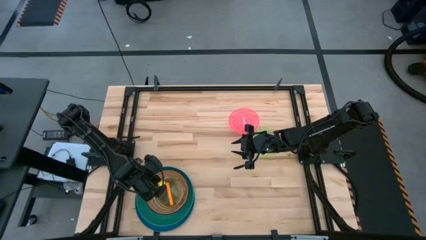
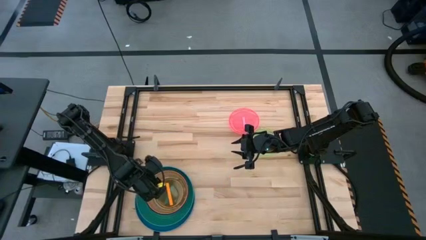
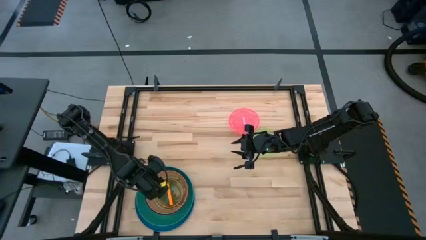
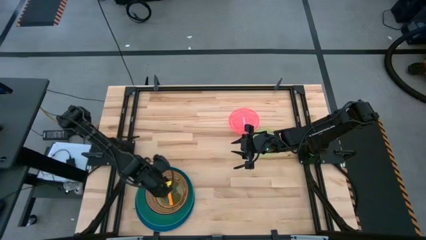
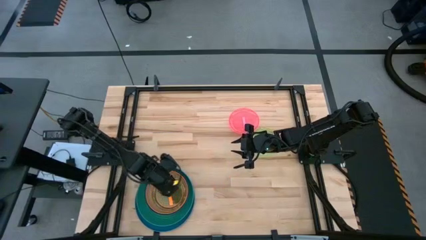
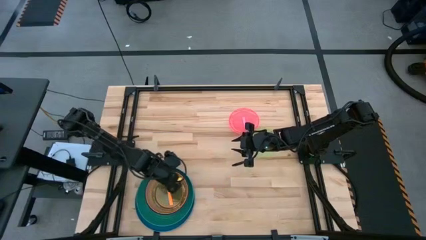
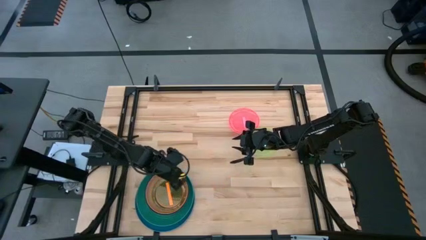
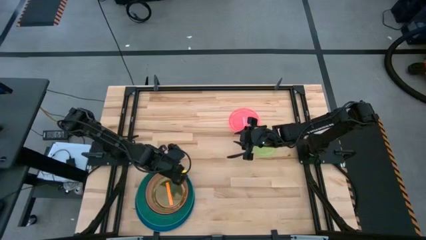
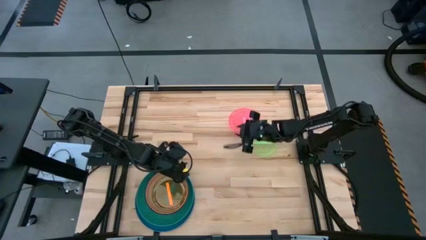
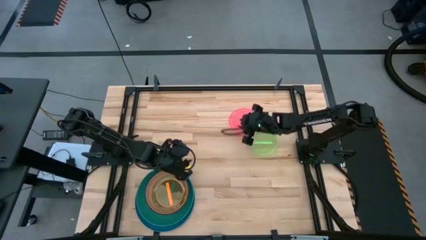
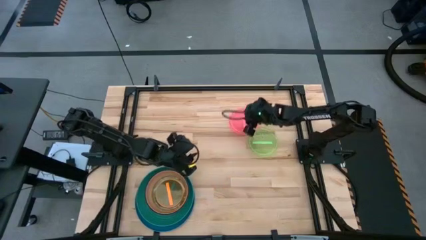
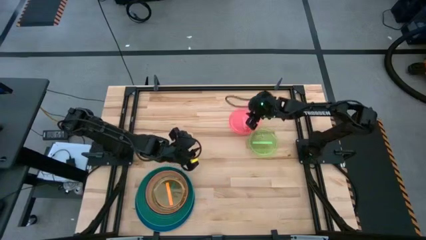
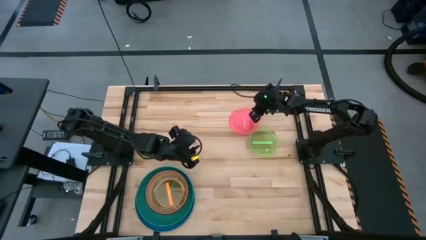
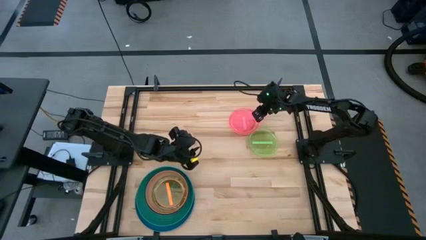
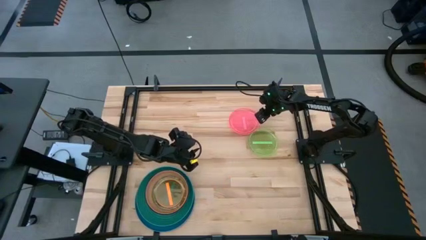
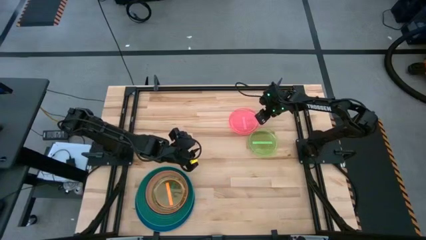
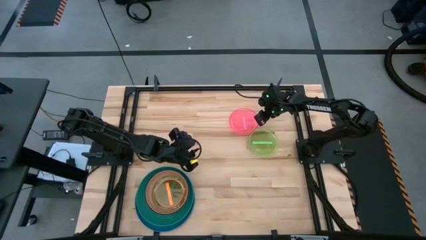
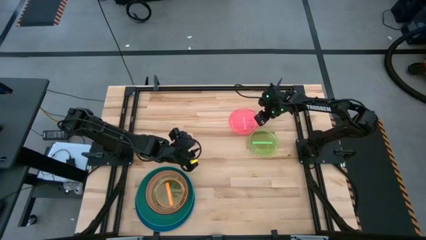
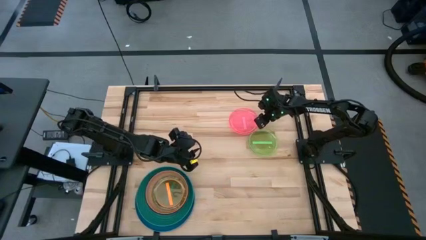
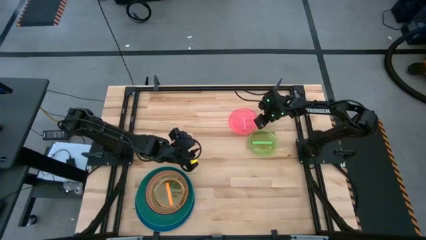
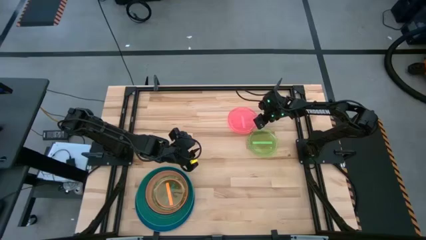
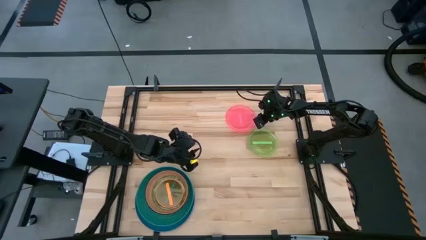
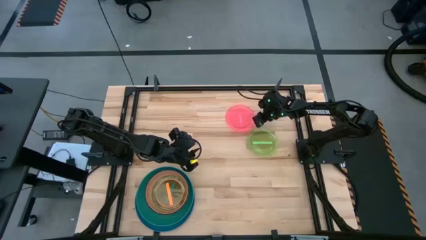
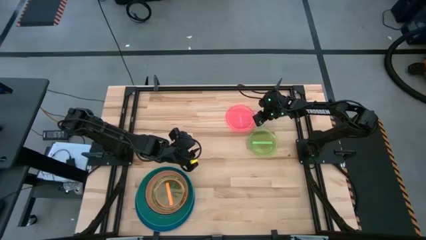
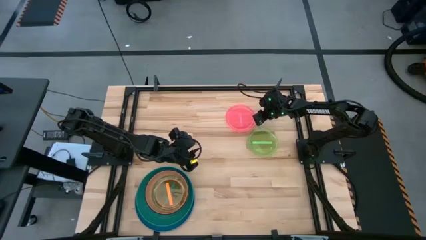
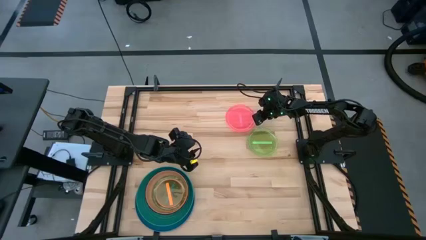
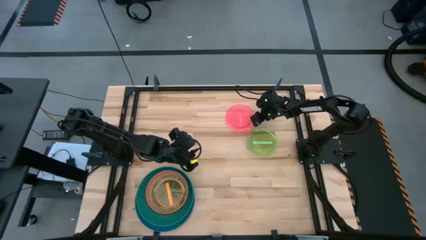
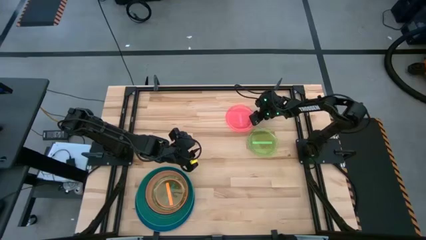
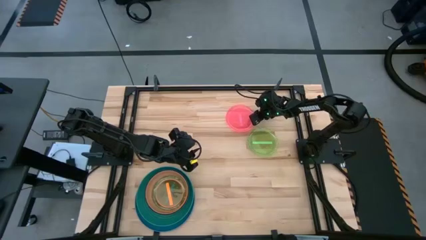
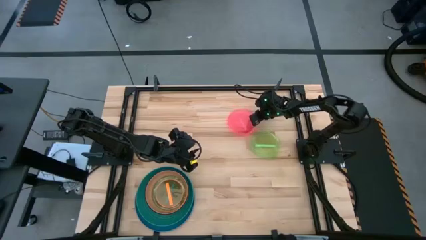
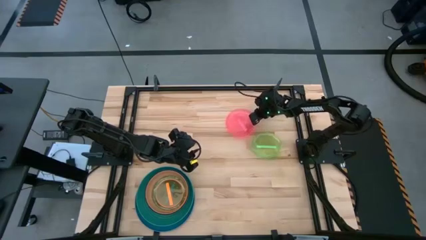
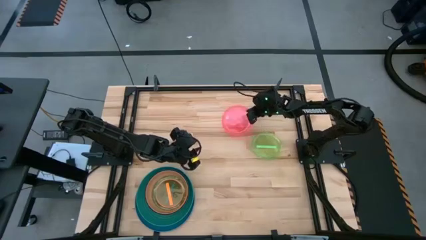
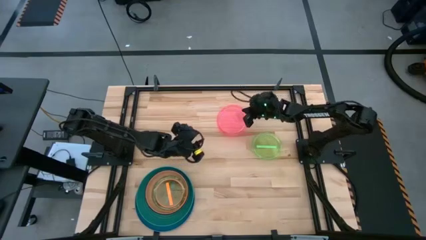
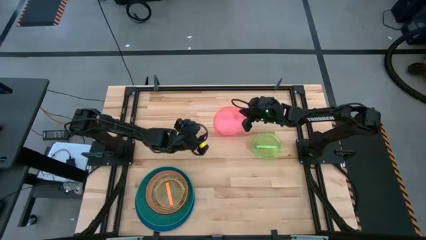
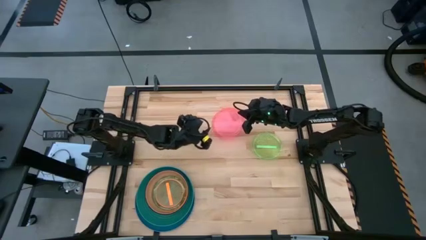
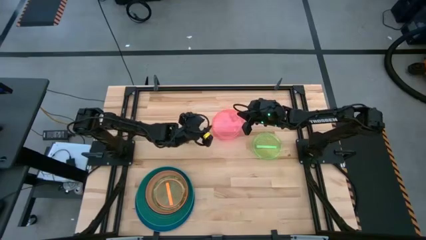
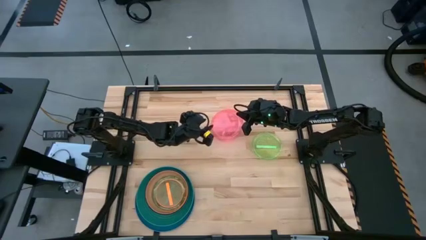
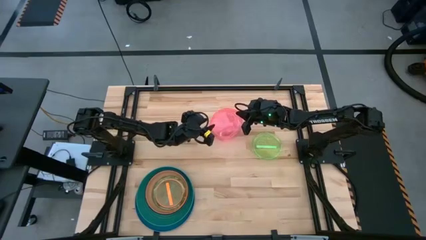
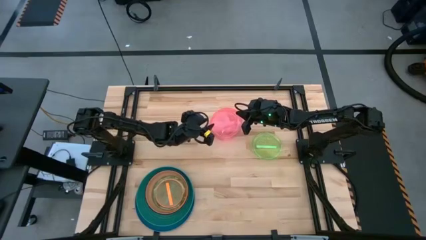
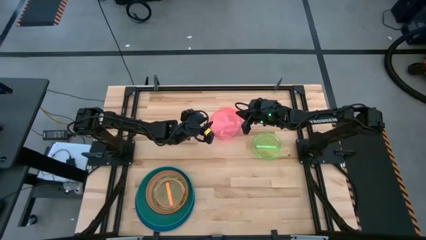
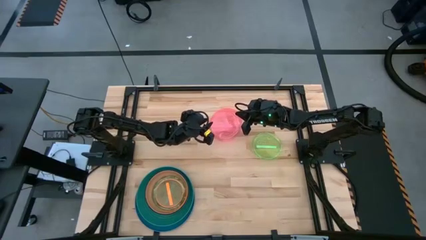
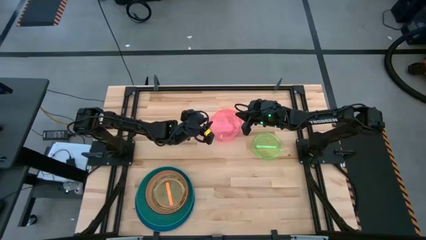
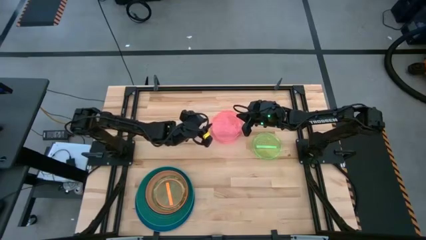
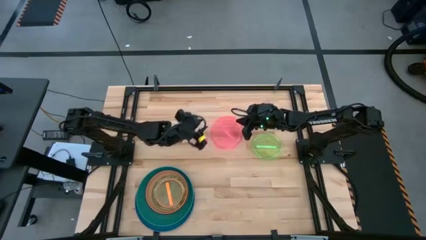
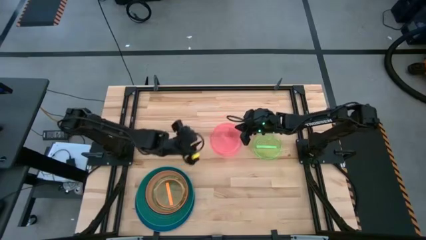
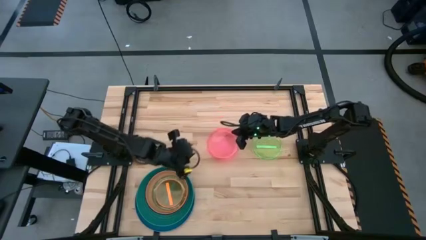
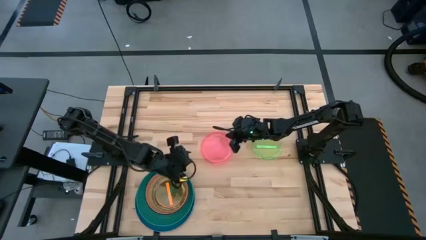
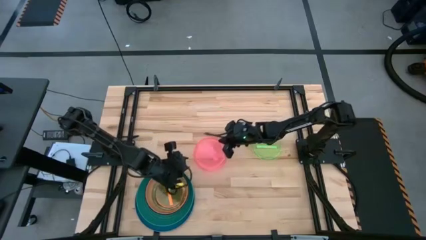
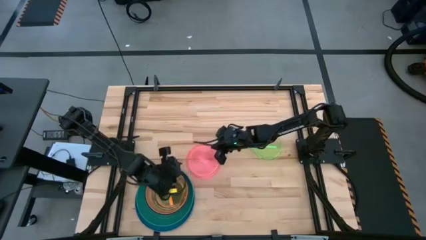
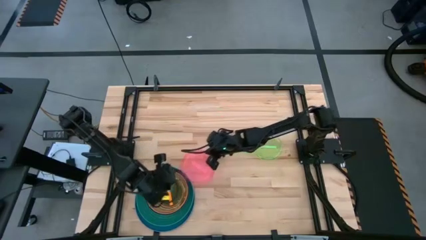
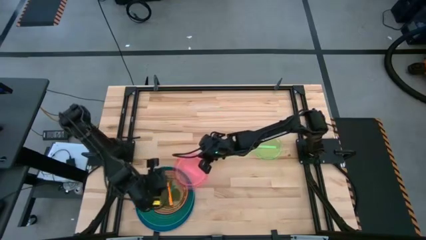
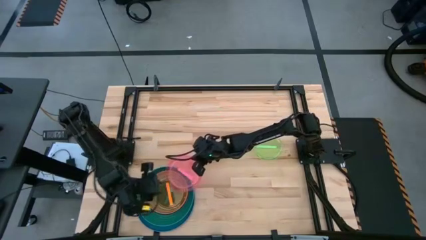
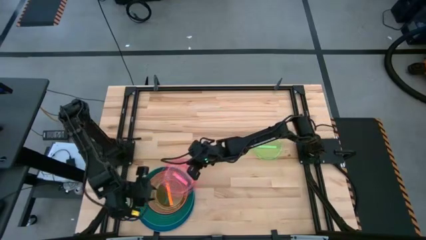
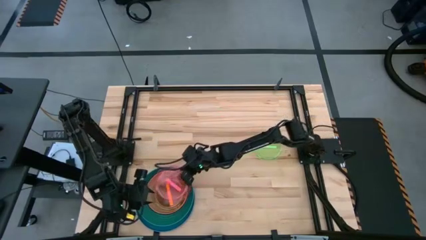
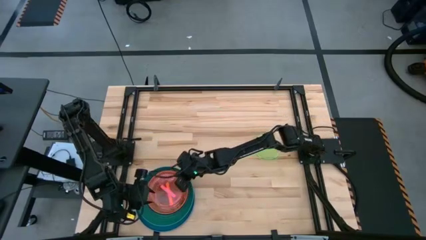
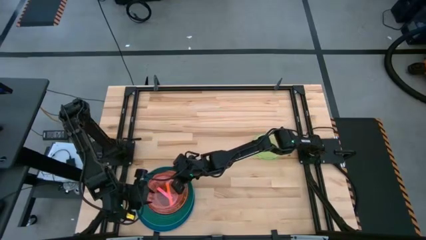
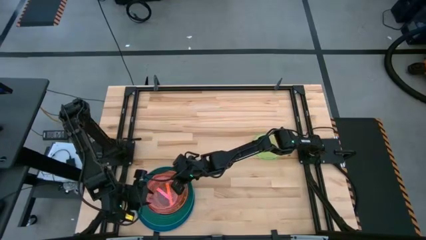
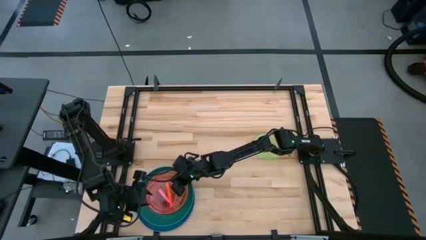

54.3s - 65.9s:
Task: Stack plastic plates
Stack the light pink plate on top of the light orange plate

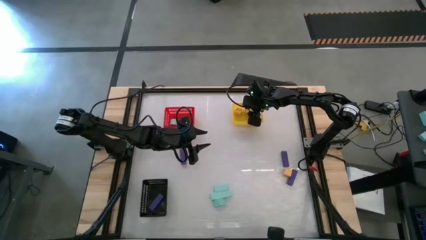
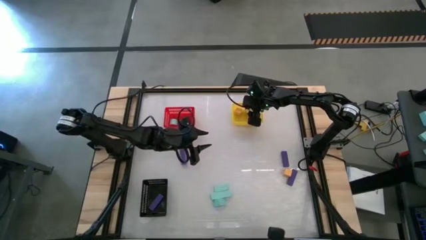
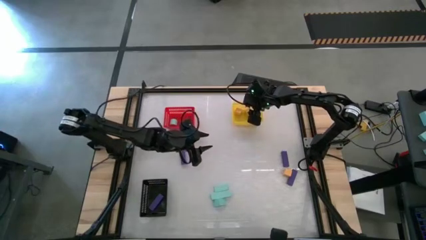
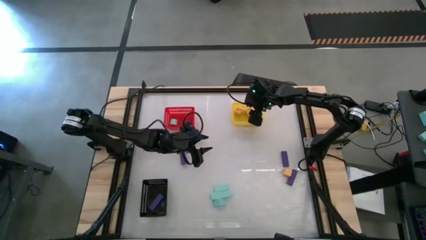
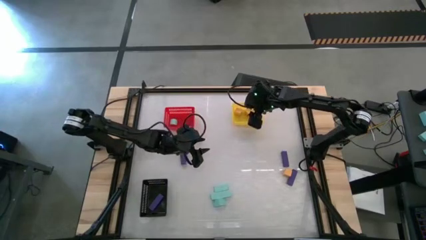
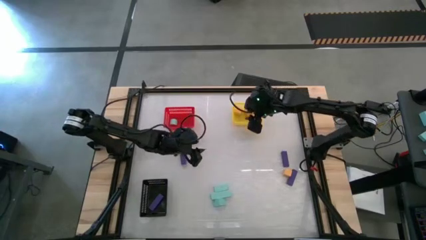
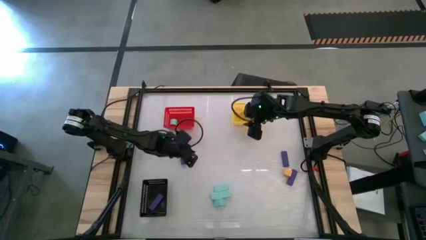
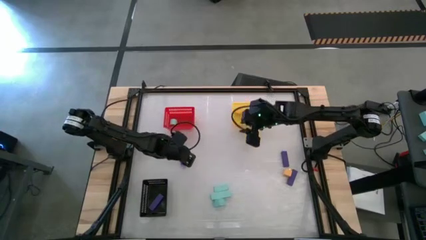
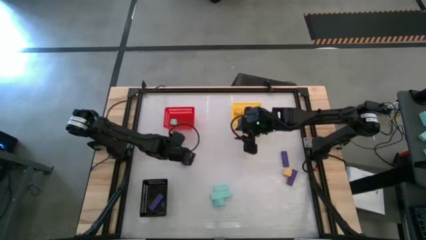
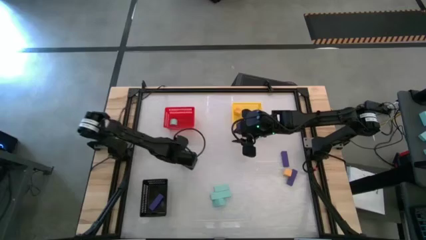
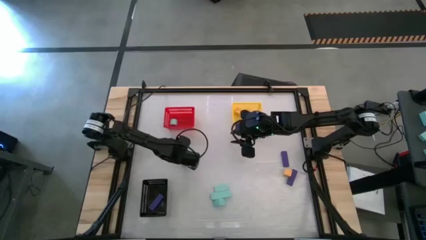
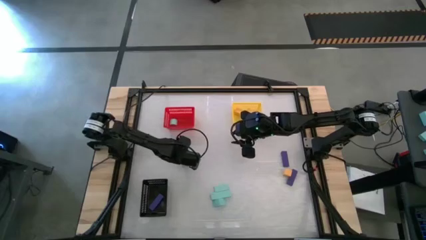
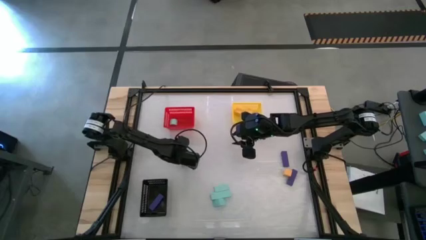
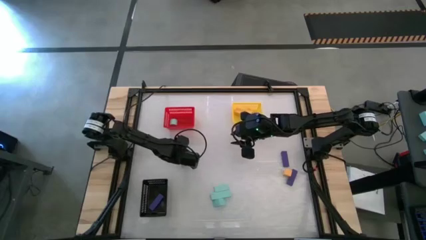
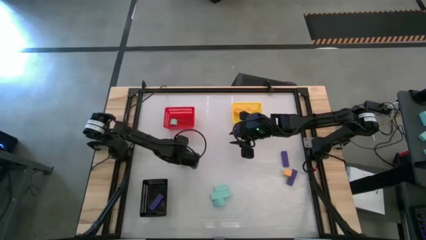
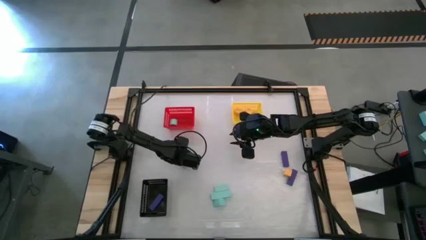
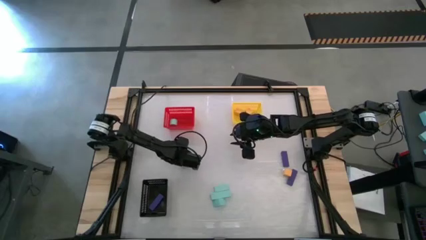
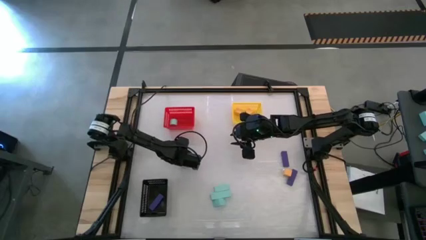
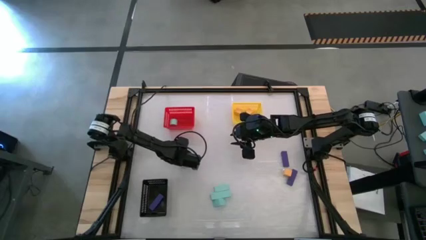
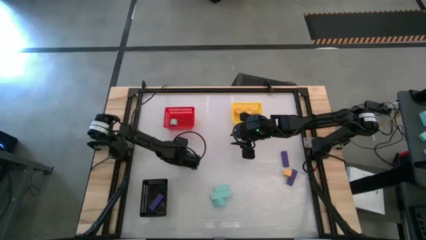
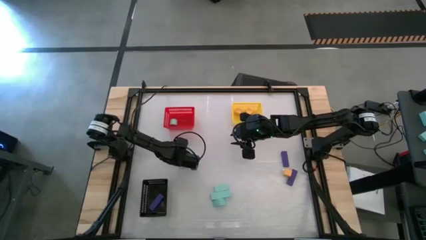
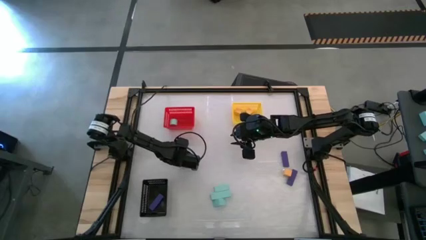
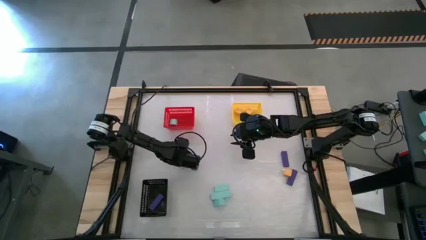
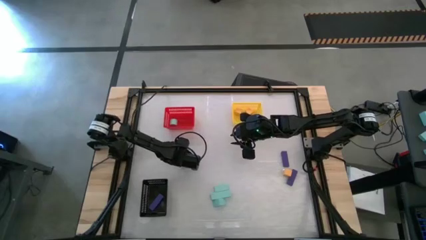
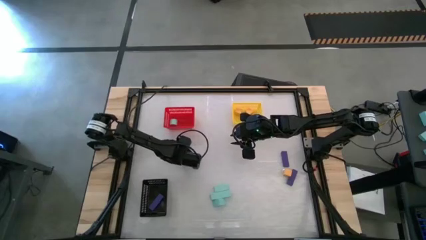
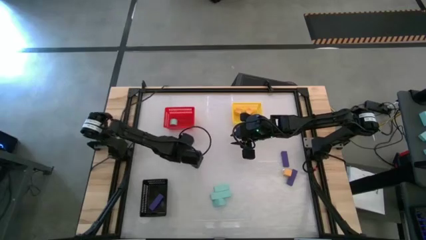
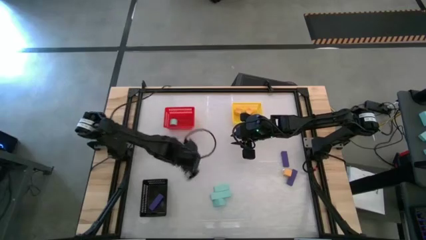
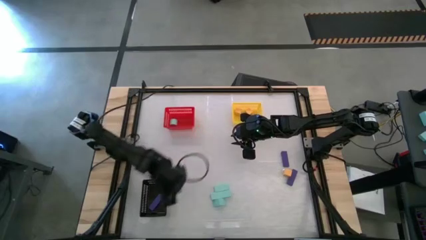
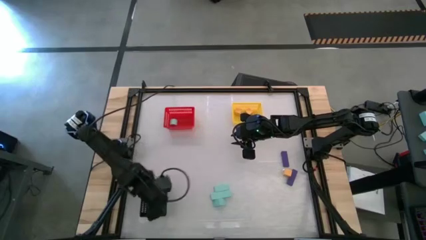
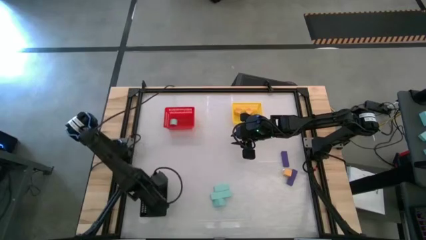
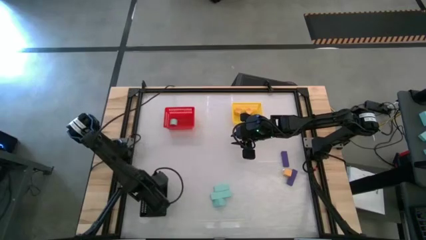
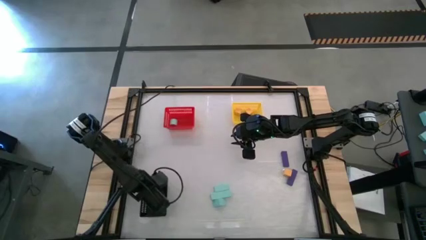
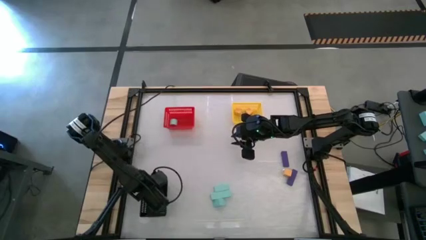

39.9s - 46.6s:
Task: Sort & place blocks by color
Put the purple block into the black bin
